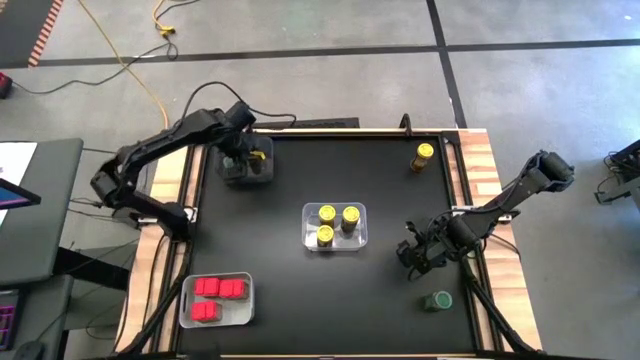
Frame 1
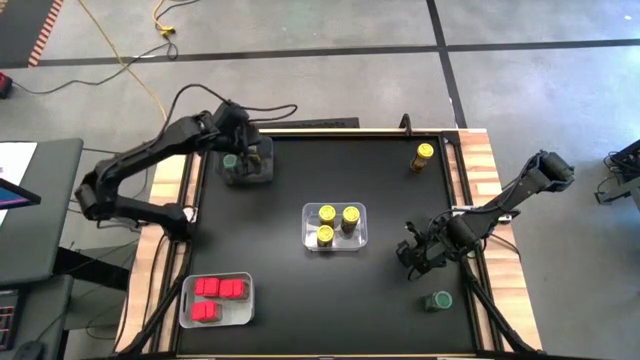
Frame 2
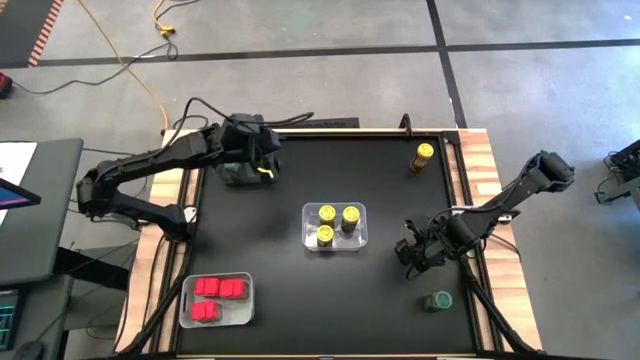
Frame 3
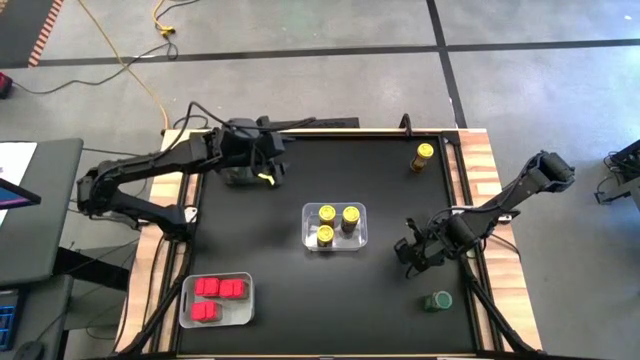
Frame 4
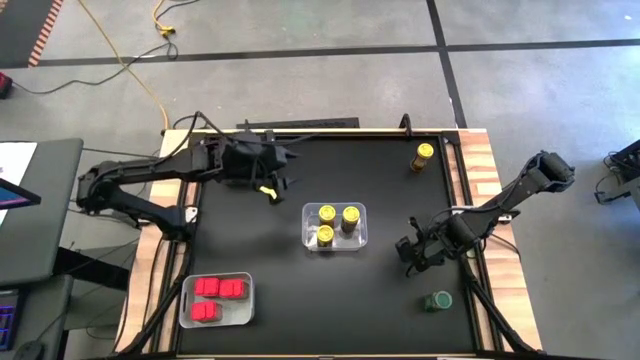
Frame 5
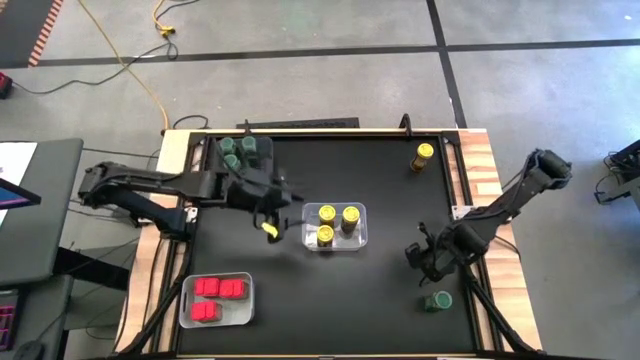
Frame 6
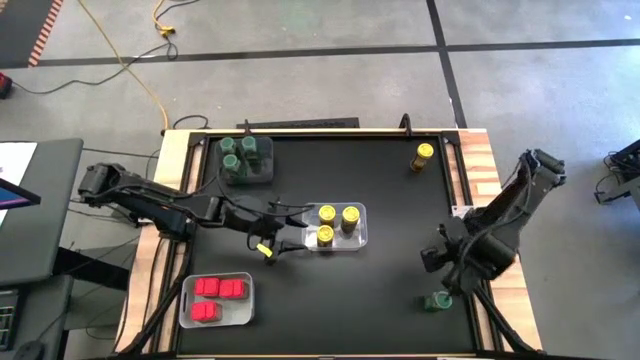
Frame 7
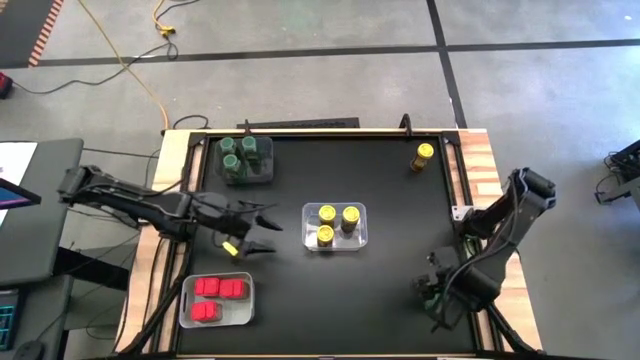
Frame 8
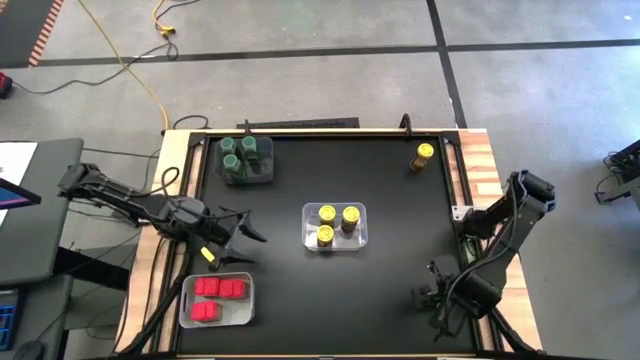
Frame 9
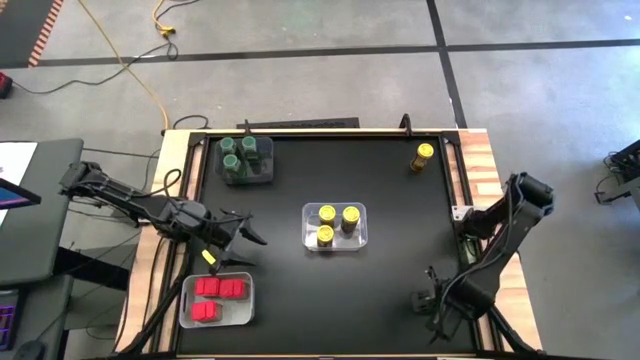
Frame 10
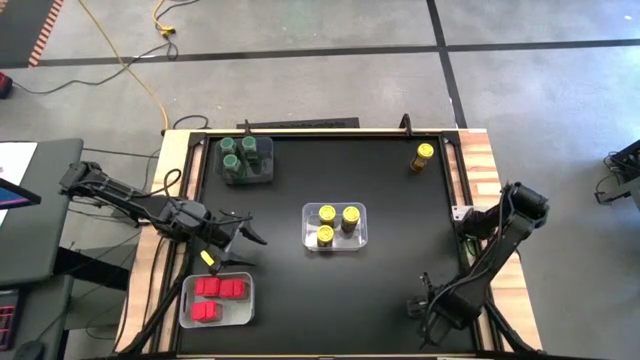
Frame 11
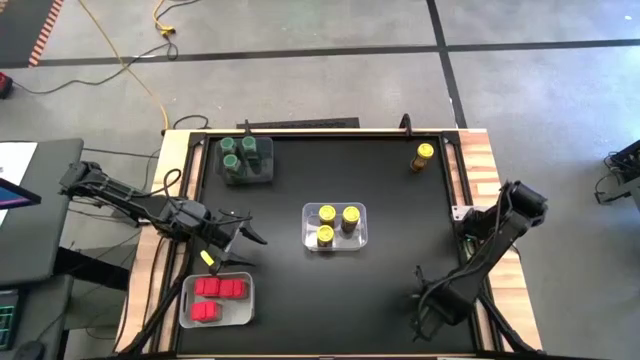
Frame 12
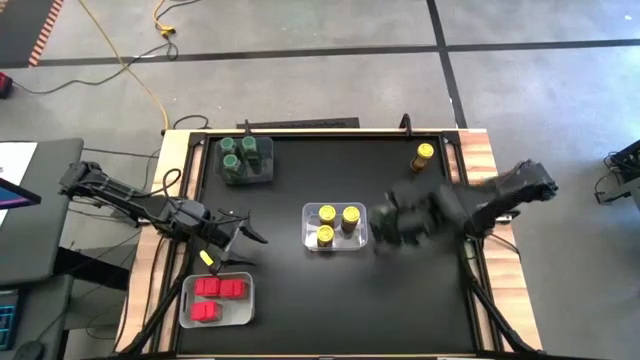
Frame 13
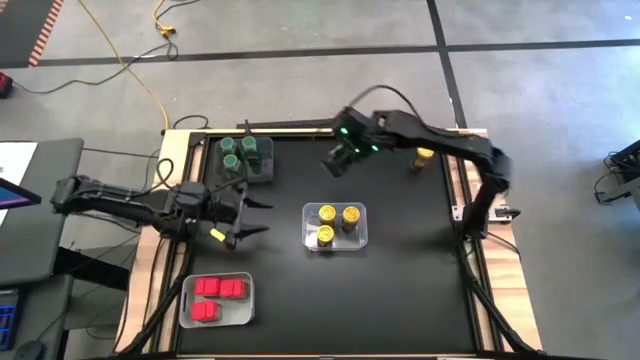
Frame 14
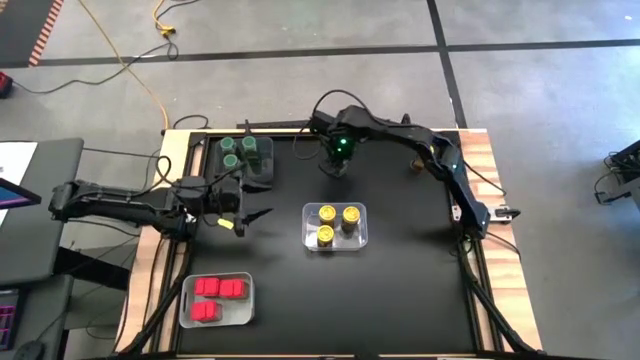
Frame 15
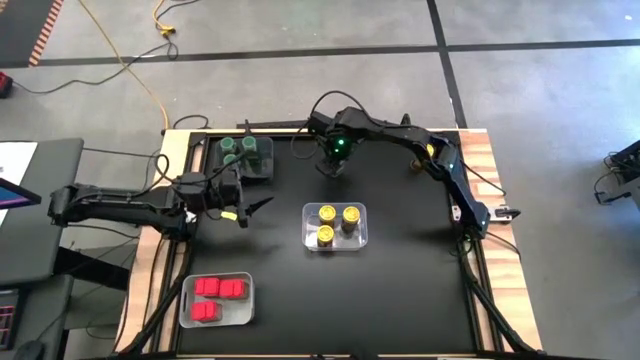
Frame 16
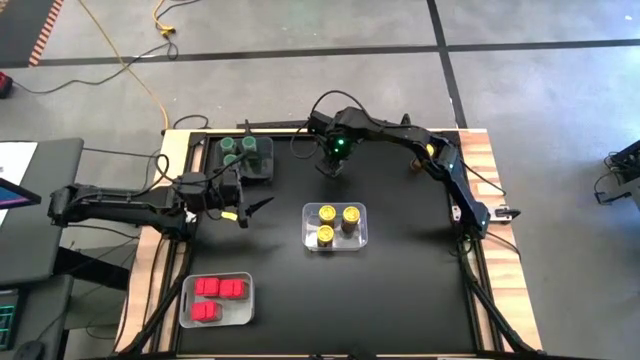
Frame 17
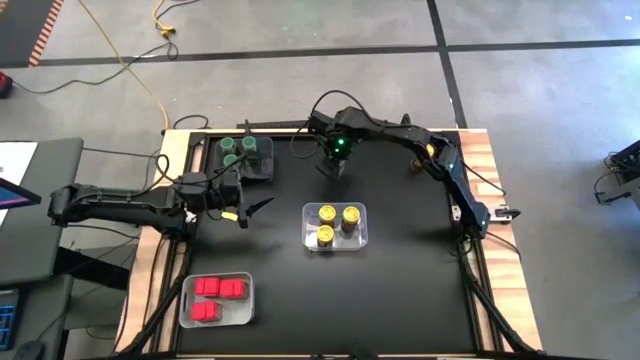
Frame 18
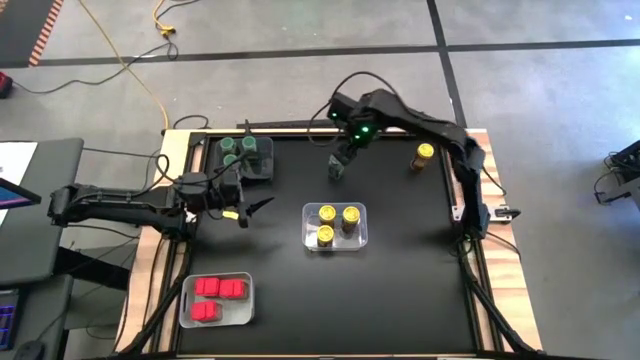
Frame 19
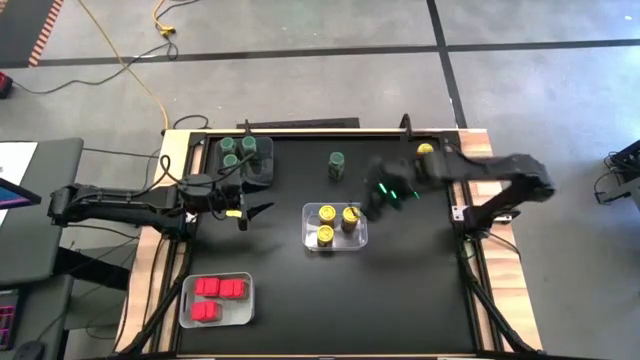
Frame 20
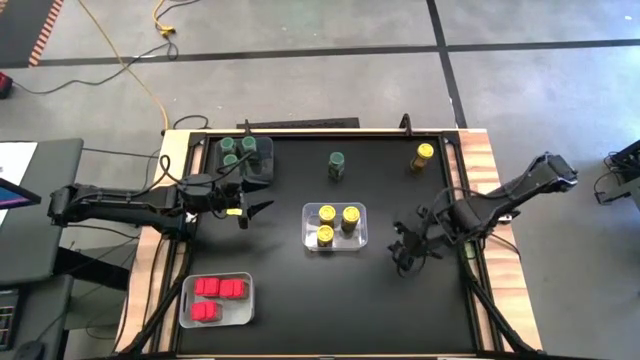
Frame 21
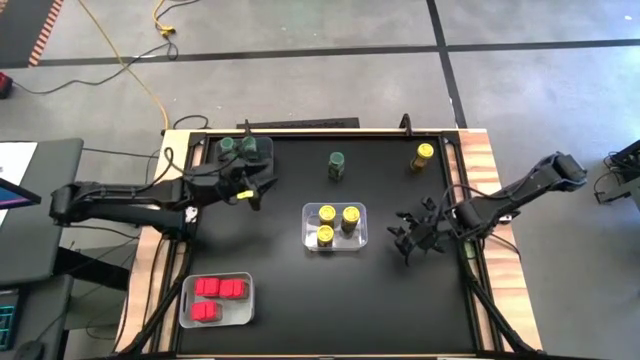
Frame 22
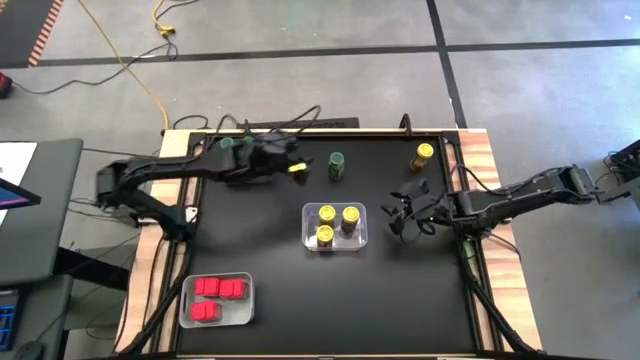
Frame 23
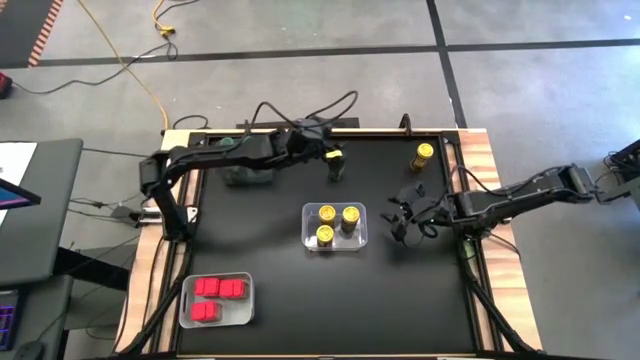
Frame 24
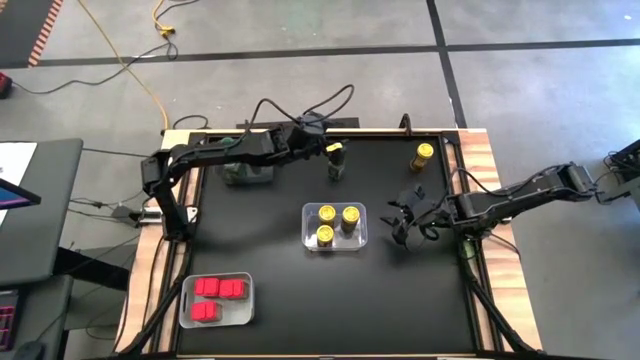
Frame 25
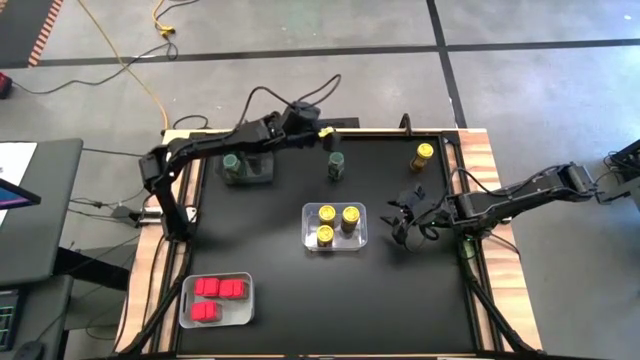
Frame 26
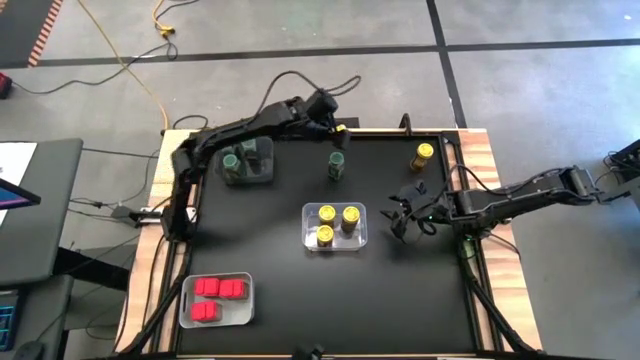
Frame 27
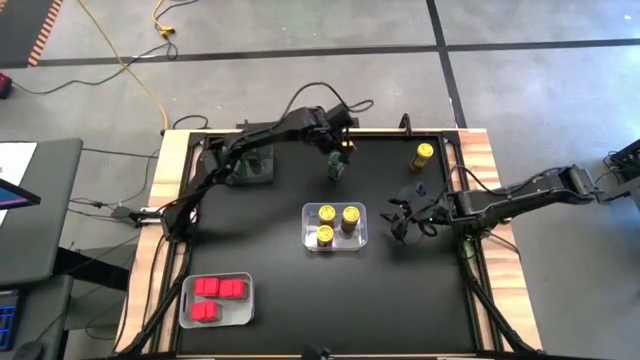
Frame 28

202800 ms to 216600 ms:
Task: Sort spices by type
Put the green seasoning bottle into the transparent bin

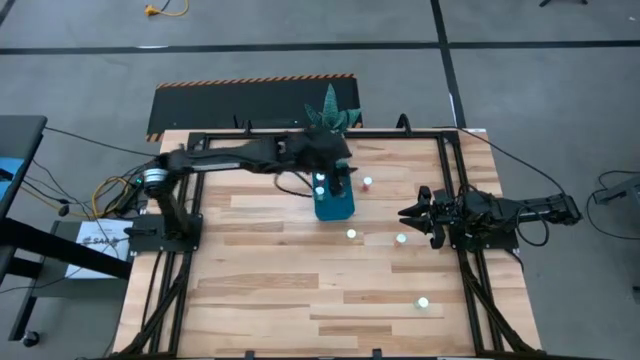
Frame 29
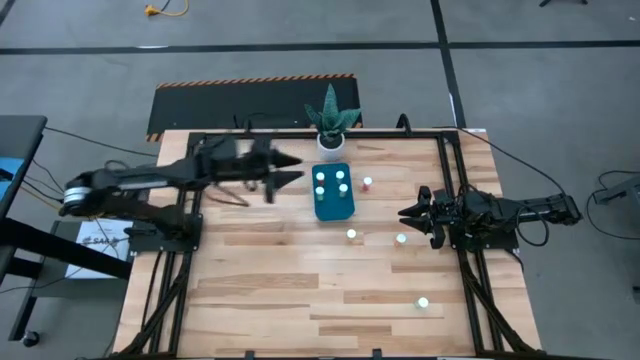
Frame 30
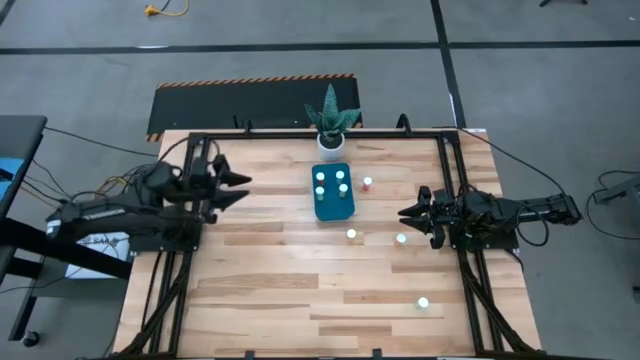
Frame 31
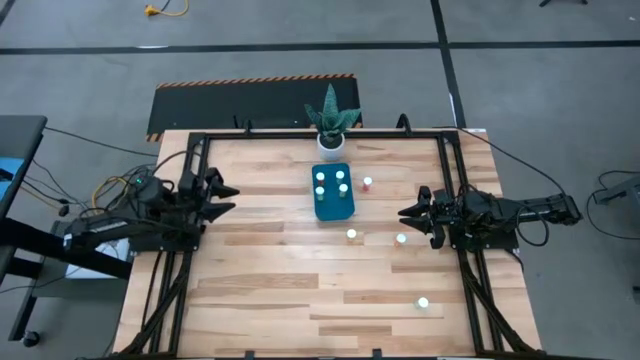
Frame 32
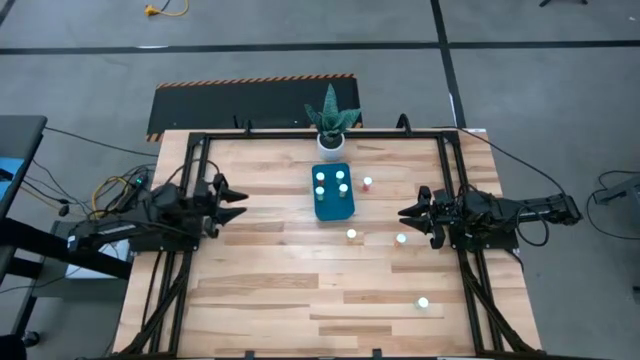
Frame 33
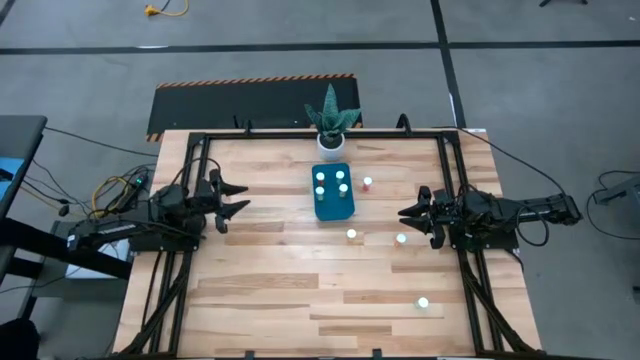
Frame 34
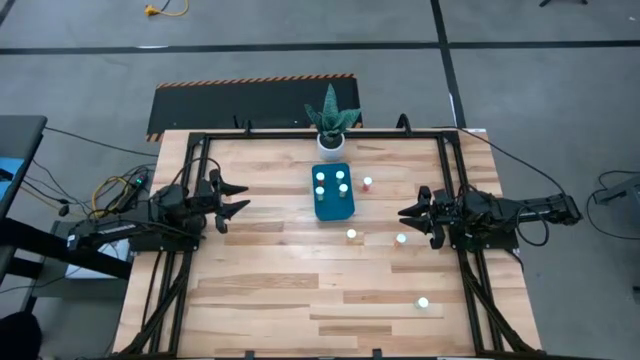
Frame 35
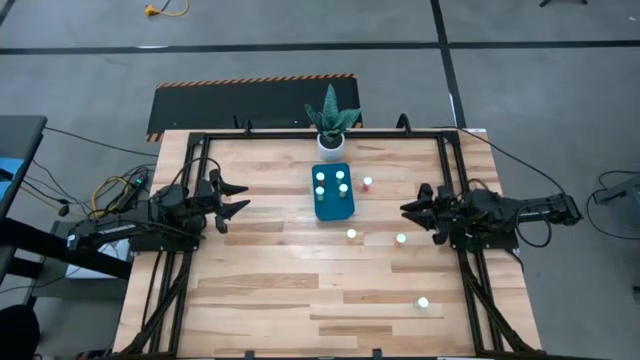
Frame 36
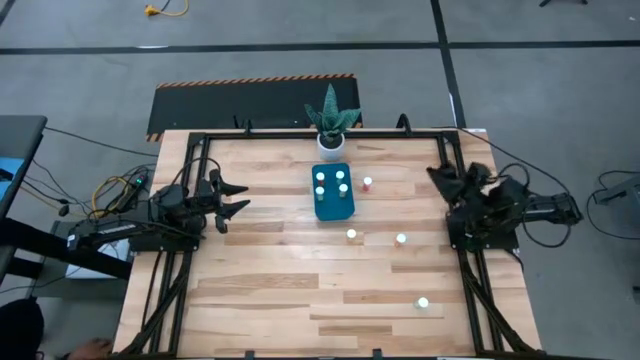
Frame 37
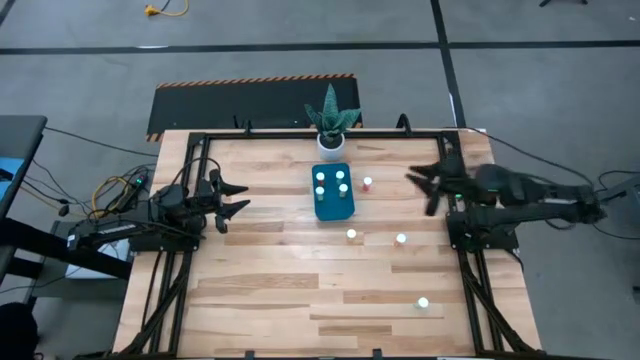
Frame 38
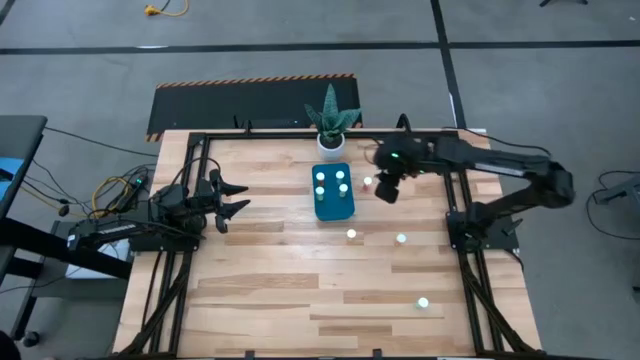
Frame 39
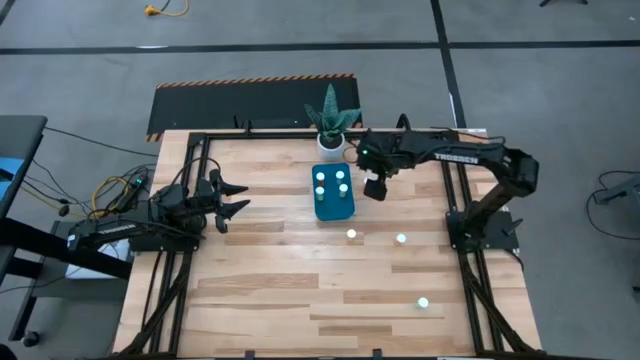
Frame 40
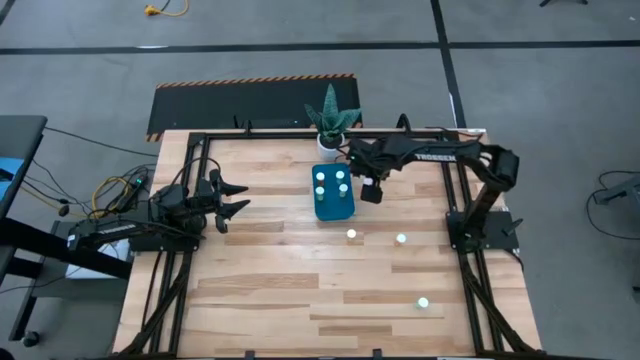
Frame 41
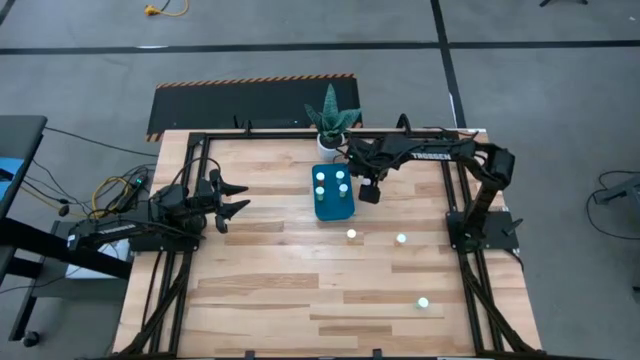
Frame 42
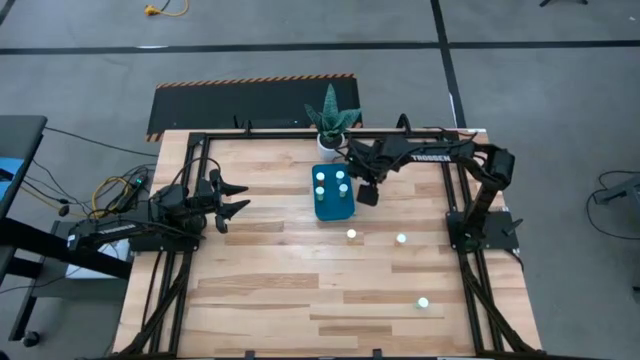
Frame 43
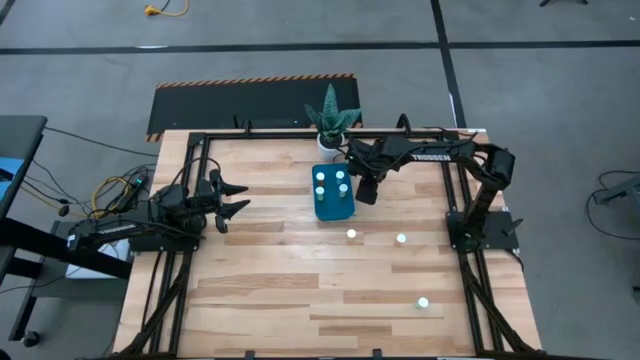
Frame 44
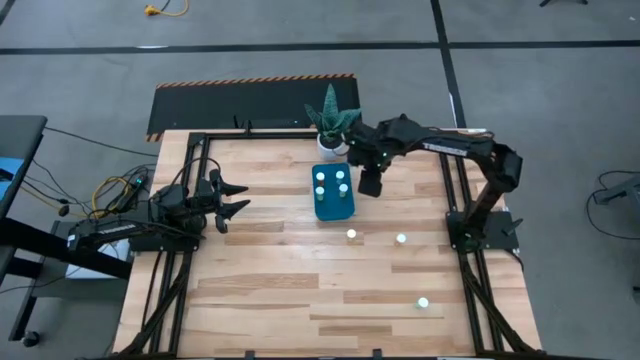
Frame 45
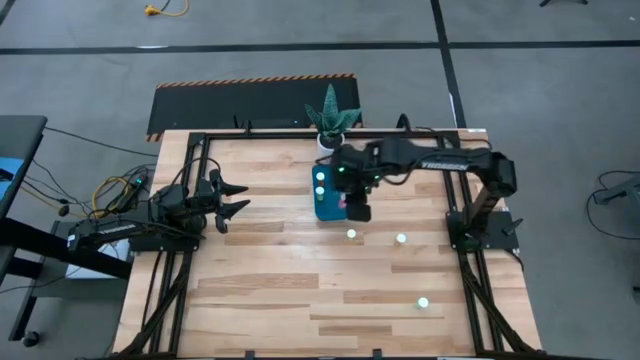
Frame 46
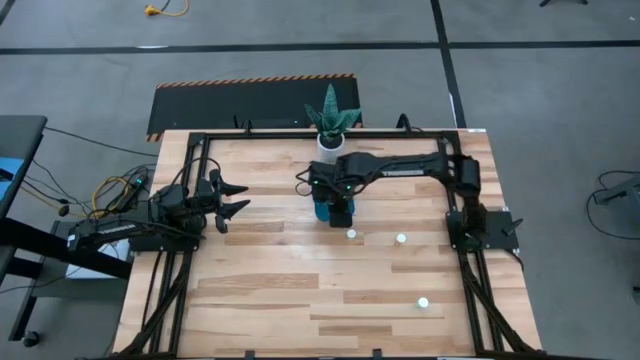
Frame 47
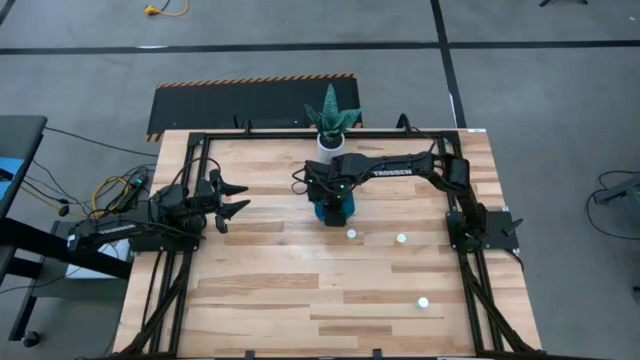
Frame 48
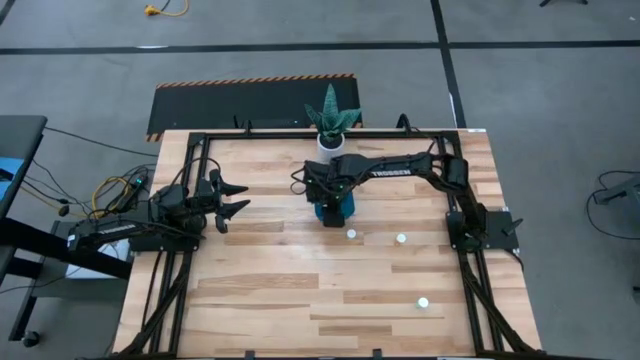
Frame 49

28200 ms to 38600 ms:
Task: Pick and place pill bottles into a basket
Put the pink pill bottle into the blue container
